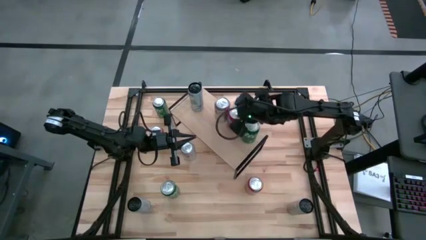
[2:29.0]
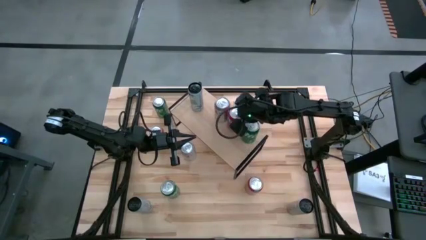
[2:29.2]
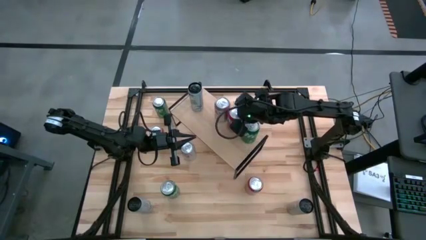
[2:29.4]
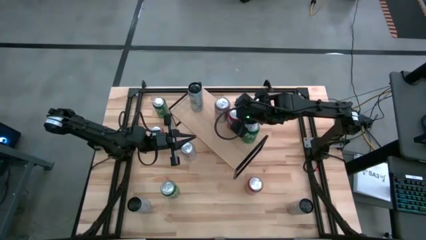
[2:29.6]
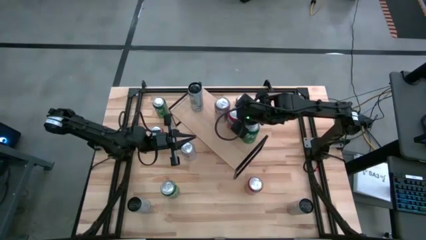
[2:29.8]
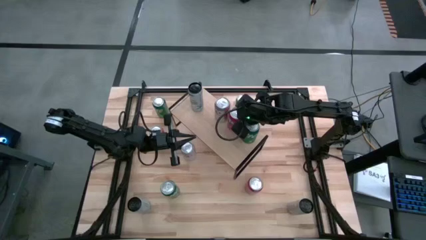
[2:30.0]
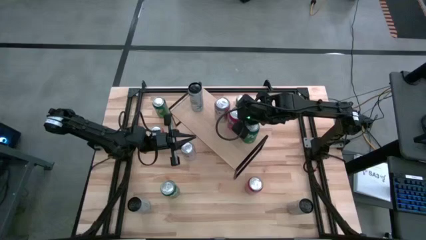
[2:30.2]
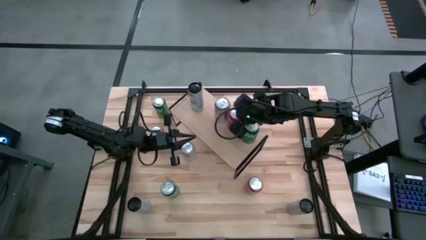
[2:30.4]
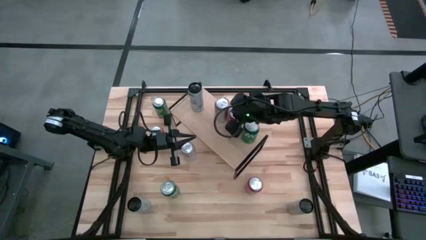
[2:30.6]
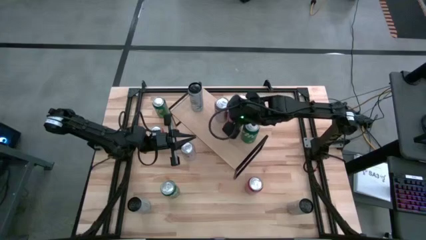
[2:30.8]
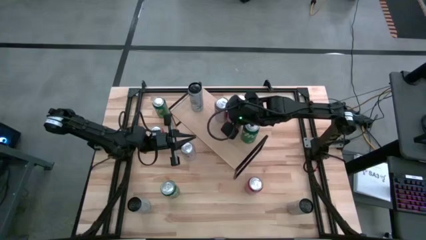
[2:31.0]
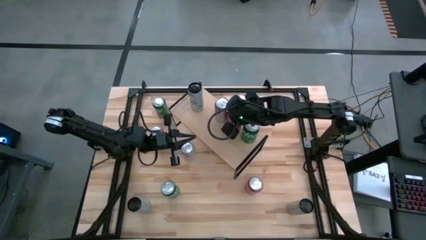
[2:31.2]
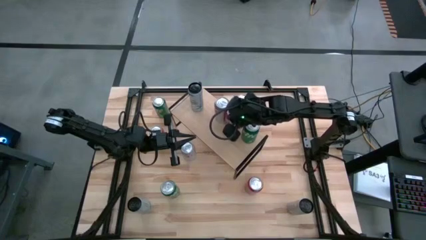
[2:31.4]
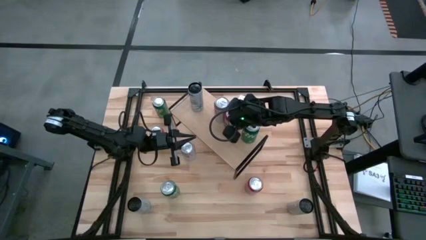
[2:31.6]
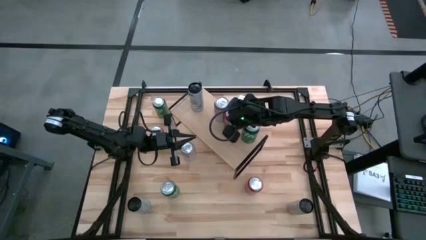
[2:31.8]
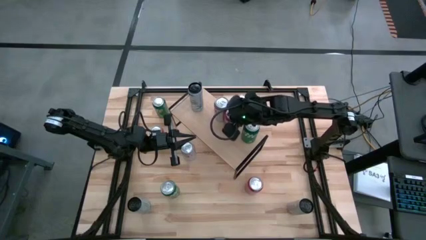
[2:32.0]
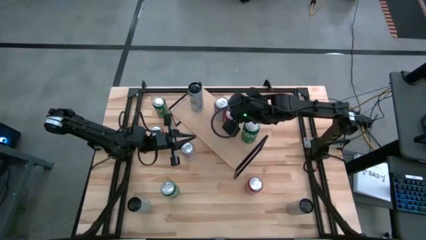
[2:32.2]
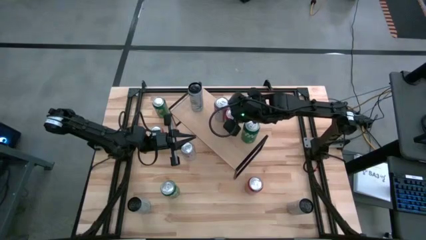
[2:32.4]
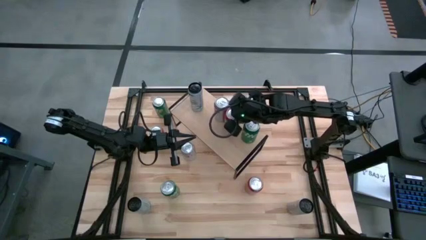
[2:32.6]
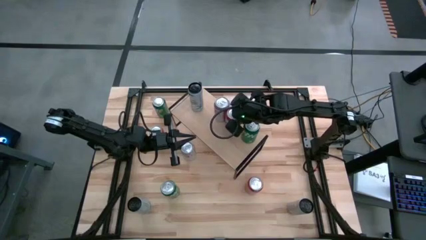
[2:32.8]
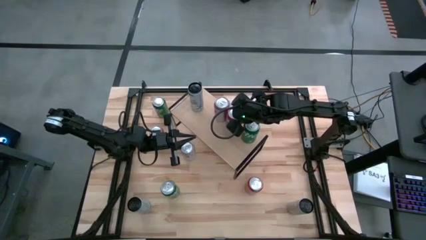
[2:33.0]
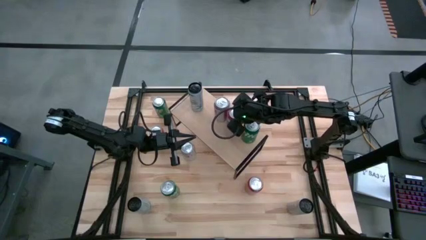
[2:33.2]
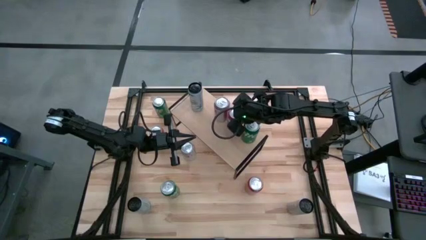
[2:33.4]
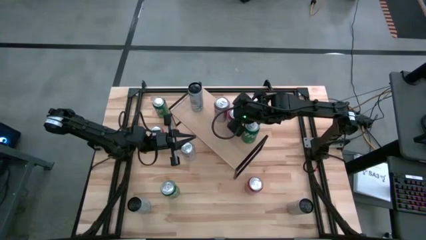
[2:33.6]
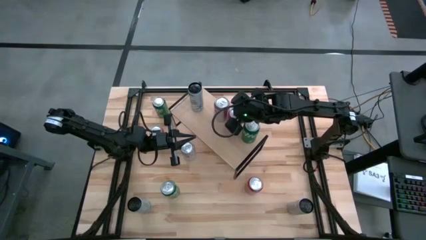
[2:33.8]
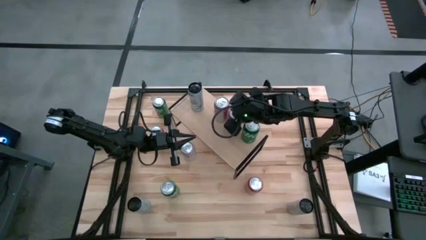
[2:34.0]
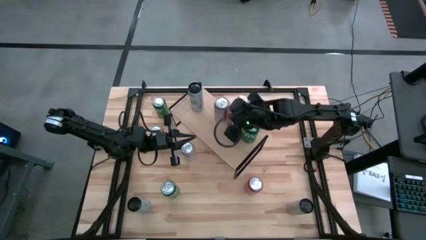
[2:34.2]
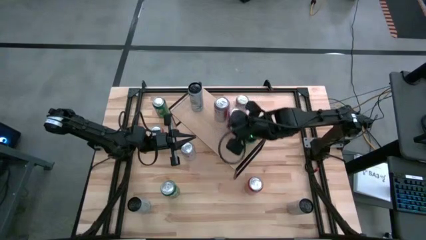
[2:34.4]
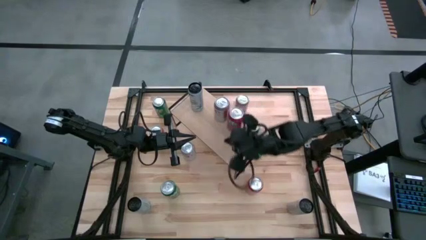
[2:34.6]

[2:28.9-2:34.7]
Task: Place canned beverage on shelf
Adjust the orange soda can on the shelf

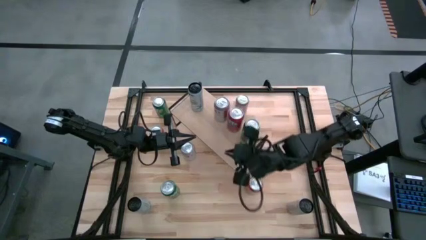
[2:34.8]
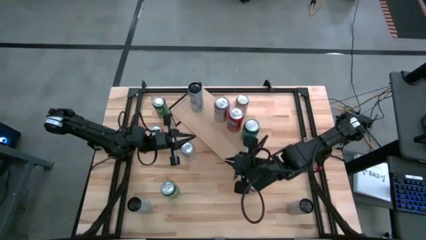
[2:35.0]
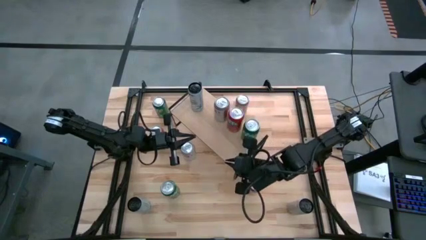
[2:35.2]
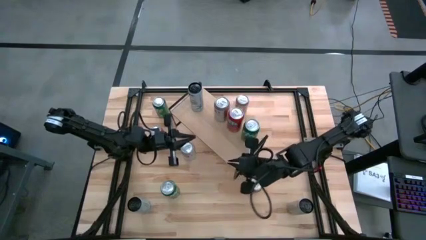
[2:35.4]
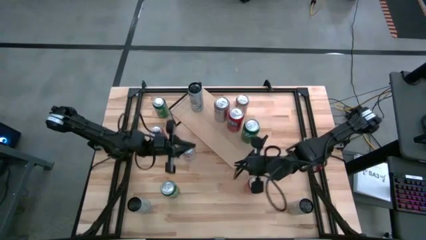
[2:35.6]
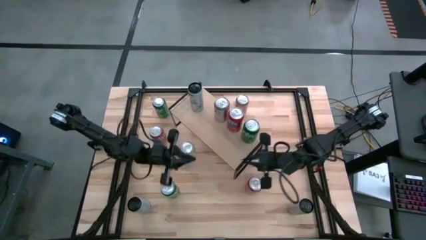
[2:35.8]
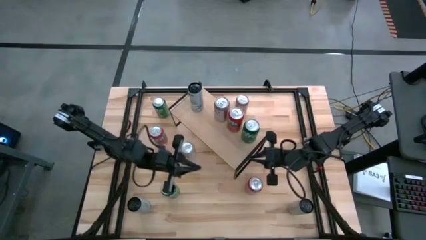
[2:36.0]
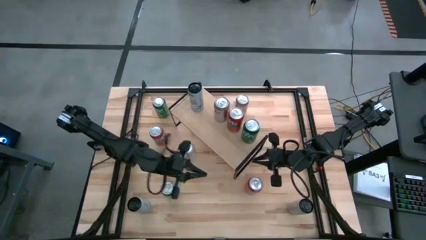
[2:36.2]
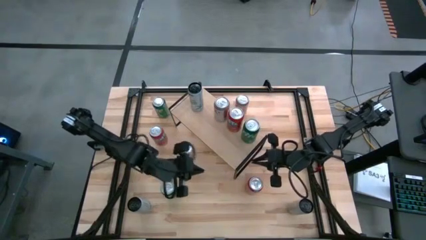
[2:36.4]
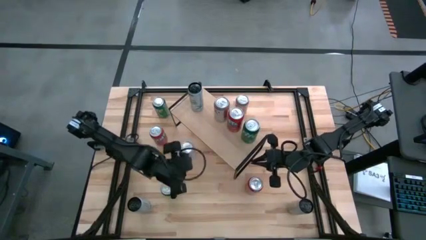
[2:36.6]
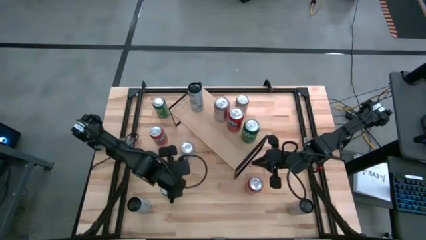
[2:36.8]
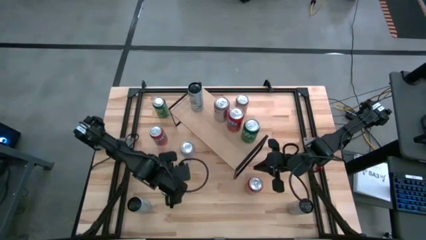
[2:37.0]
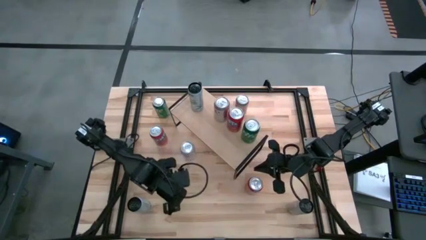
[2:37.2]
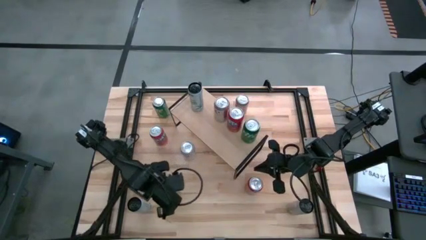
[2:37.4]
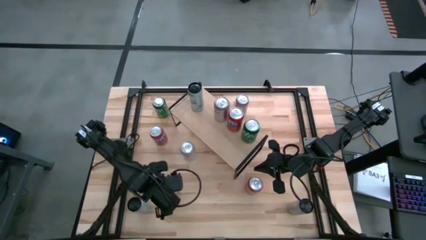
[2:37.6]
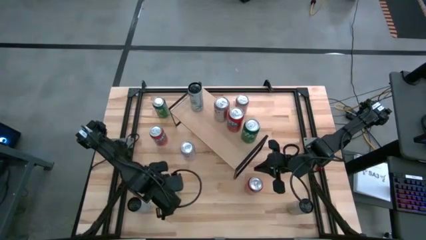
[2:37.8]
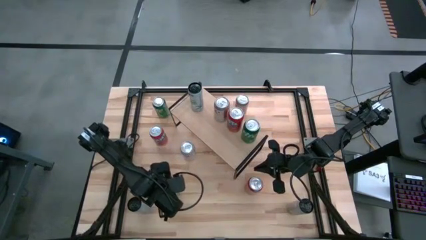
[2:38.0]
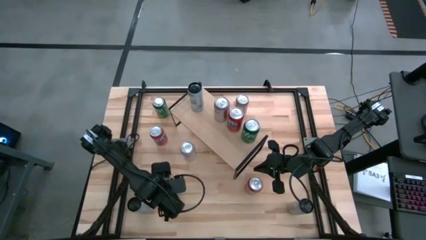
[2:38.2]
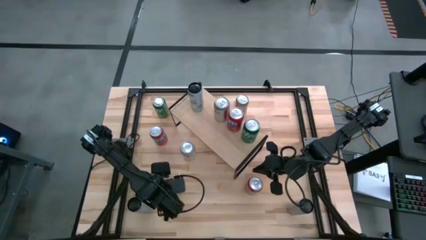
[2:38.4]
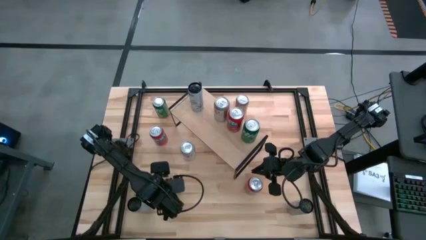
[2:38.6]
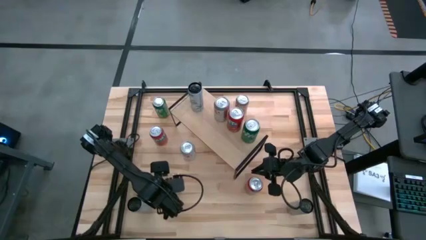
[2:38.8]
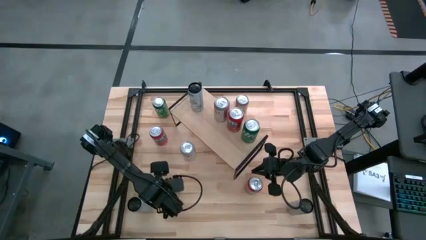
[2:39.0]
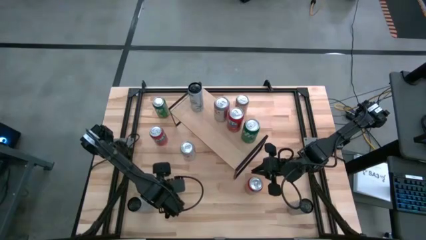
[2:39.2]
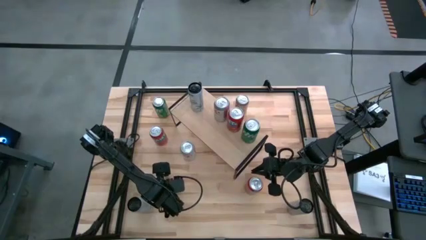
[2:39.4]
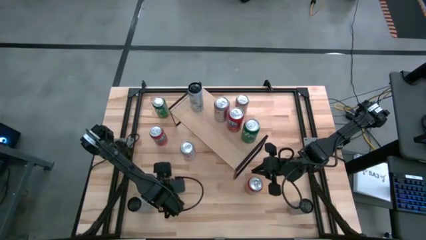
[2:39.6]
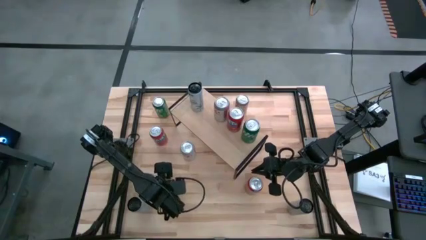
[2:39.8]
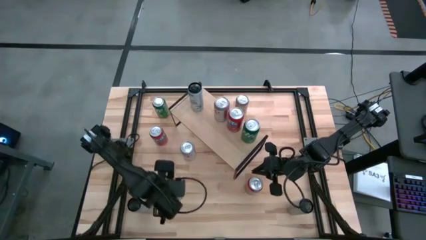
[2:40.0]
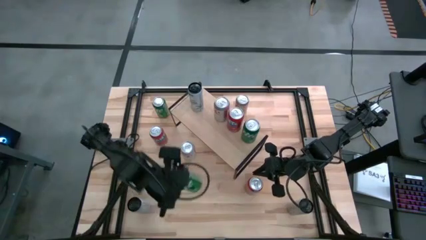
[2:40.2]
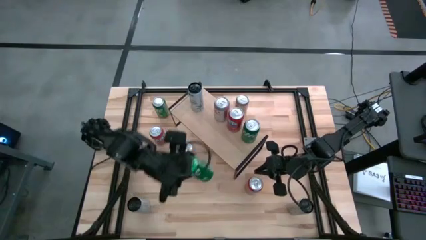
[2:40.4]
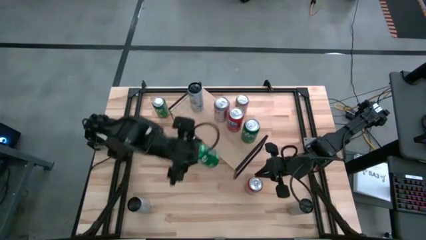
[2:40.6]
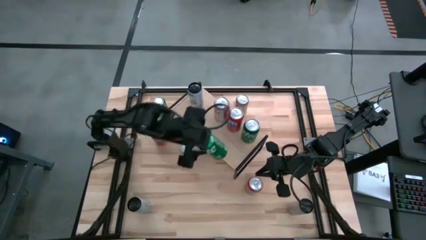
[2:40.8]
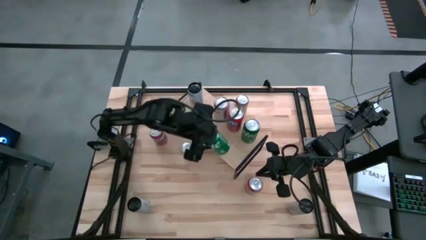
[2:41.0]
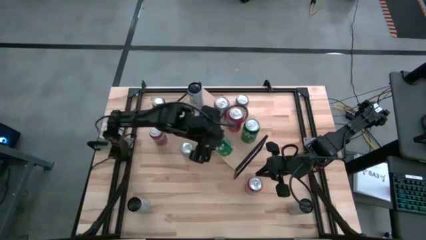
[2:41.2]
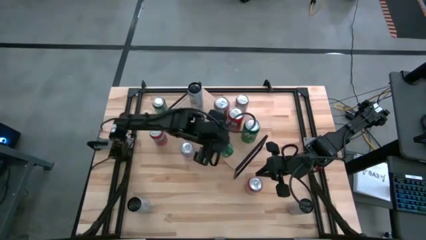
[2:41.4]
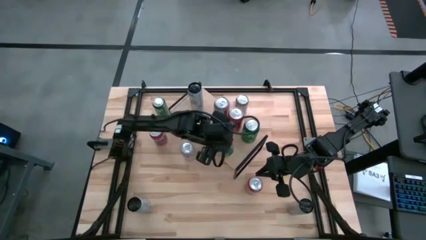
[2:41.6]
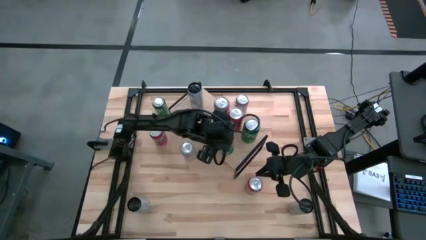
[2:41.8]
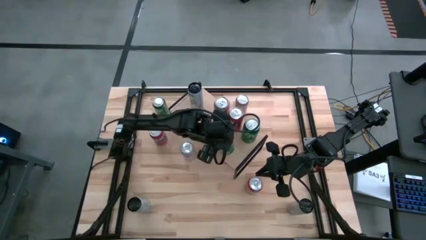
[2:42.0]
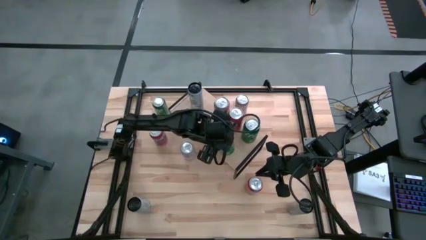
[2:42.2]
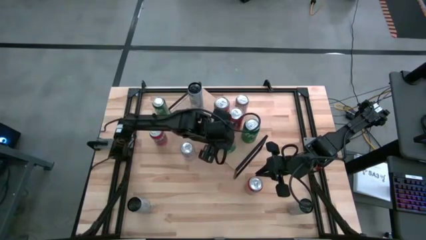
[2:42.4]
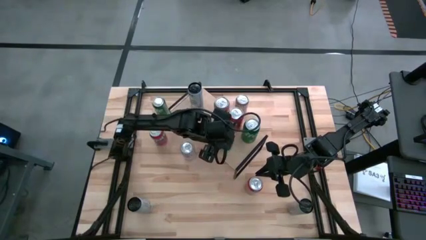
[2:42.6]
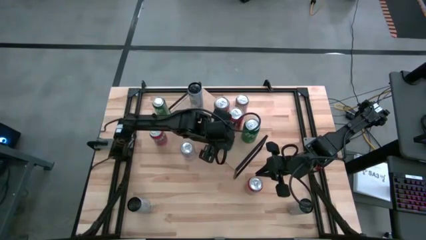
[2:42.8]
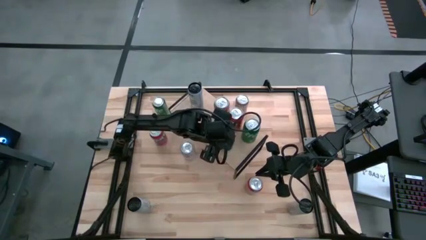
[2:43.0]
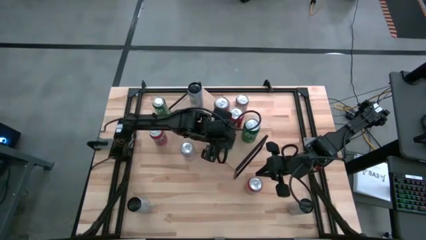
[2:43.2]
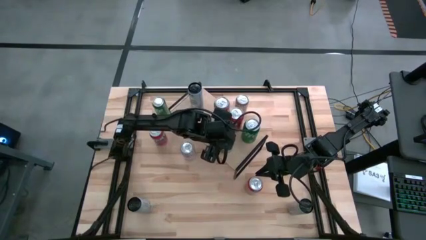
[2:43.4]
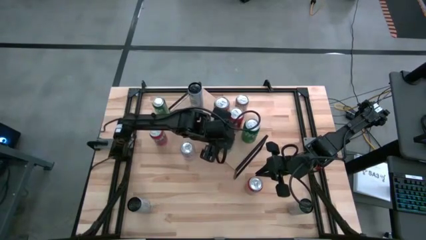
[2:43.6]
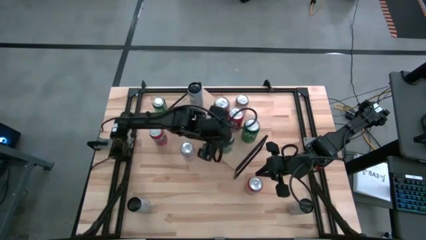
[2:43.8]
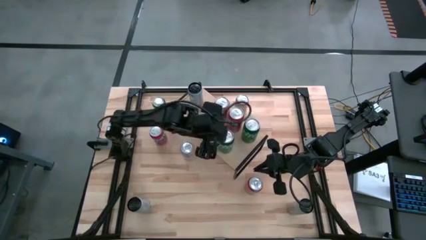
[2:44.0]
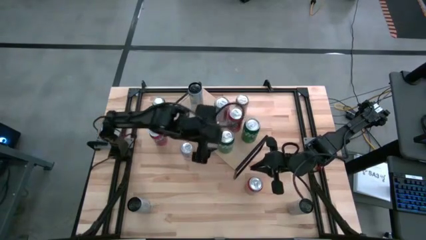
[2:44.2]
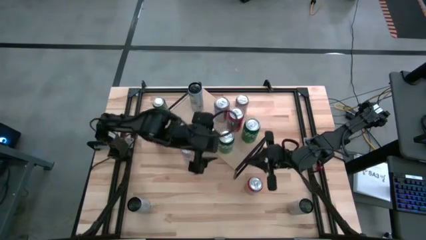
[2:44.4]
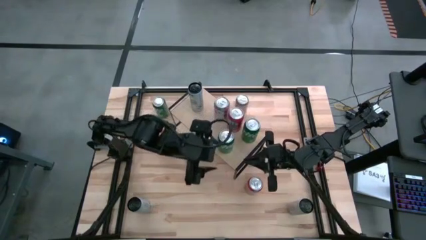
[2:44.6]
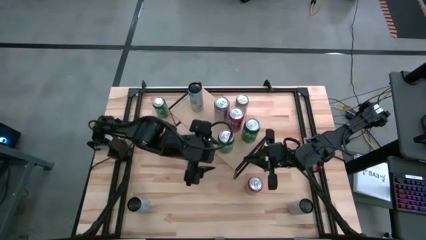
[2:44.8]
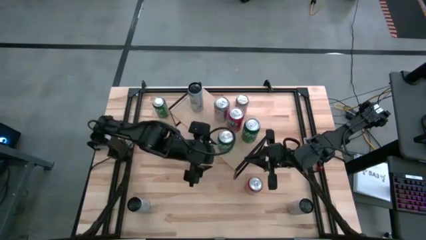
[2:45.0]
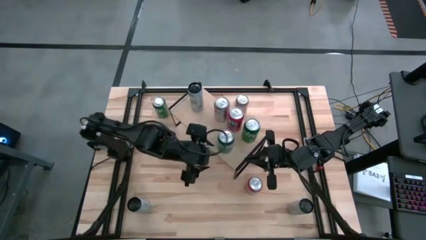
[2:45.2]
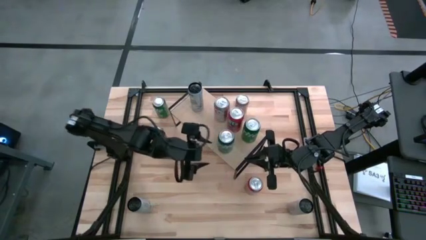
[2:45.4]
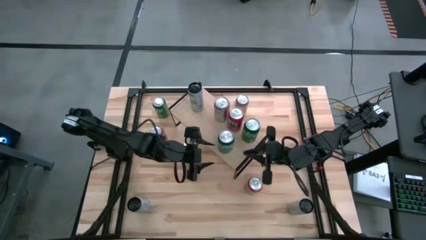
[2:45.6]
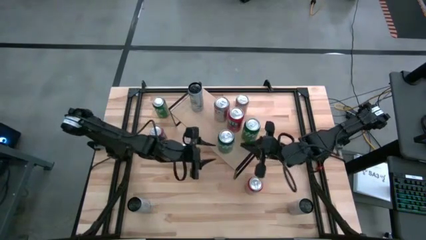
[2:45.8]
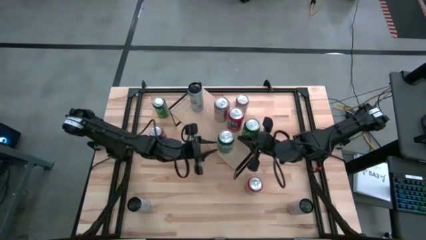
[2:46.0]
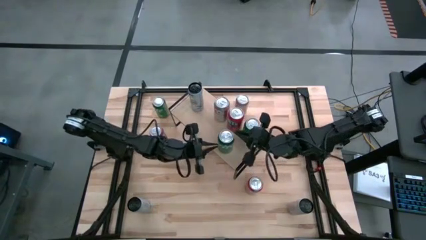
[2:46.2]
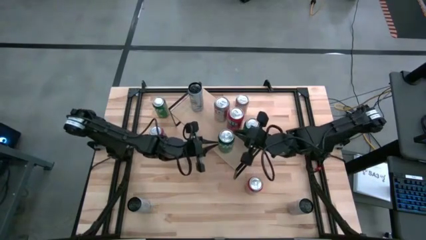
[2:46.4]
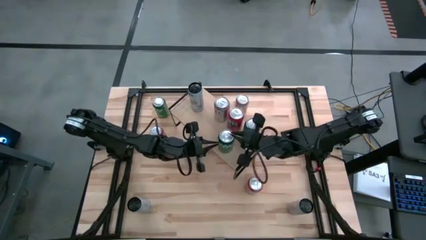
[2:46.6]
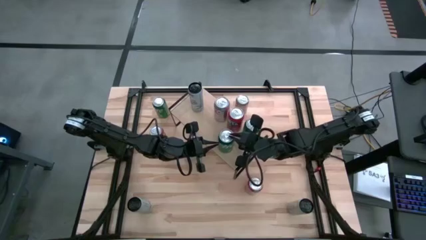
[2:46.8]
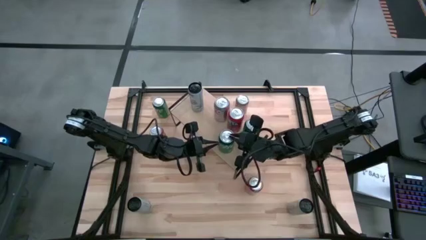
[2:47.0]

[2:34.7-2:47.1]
Put the bottom green soda can on the shelf aligned with the other green soda
